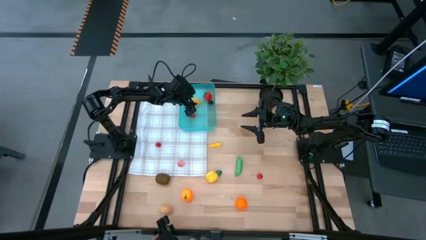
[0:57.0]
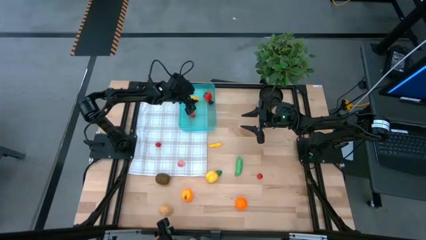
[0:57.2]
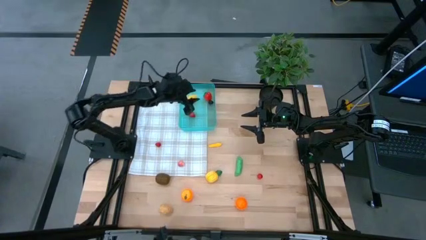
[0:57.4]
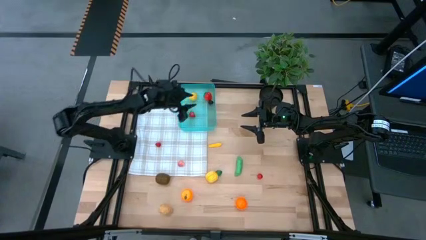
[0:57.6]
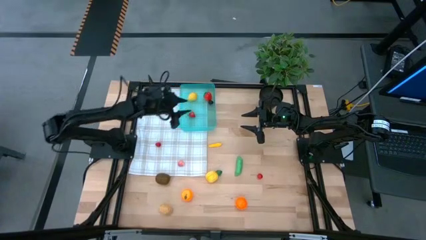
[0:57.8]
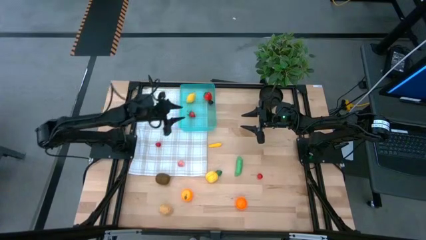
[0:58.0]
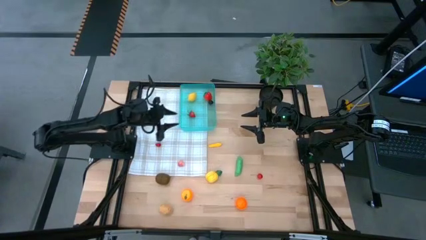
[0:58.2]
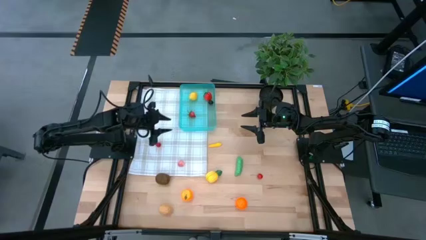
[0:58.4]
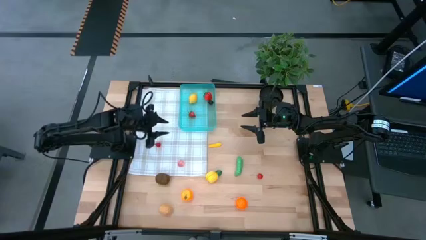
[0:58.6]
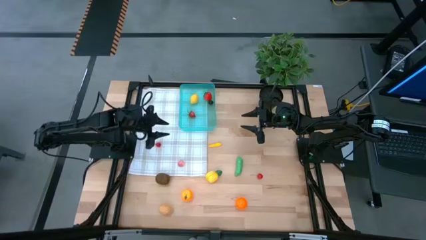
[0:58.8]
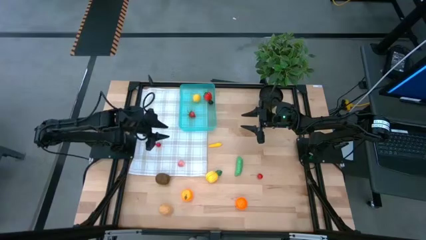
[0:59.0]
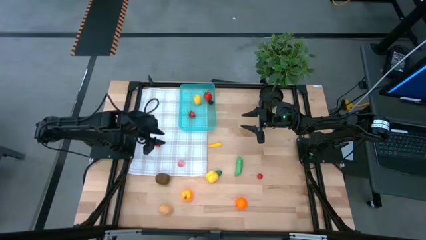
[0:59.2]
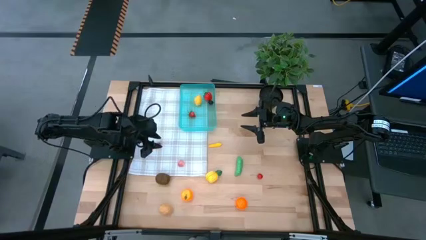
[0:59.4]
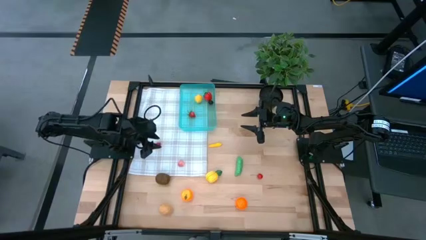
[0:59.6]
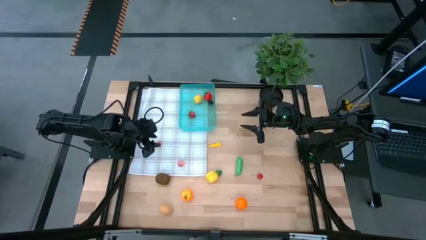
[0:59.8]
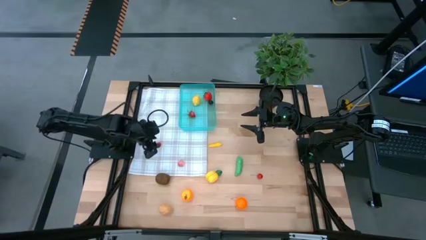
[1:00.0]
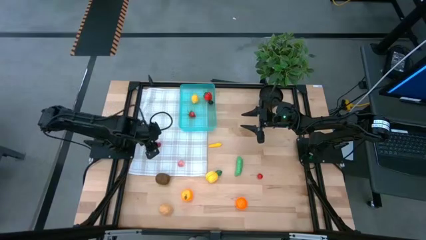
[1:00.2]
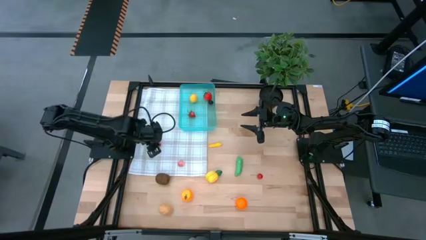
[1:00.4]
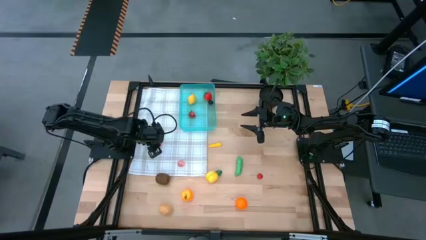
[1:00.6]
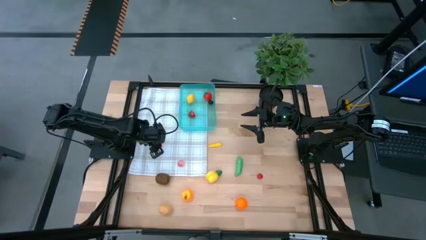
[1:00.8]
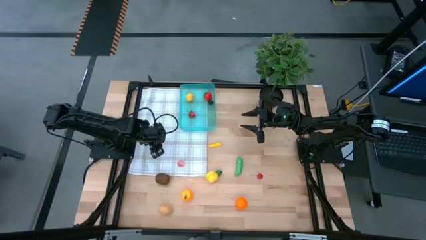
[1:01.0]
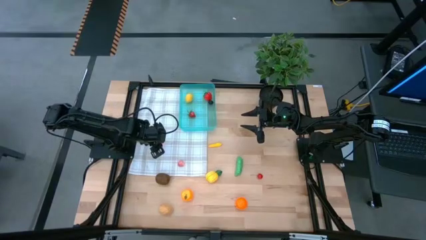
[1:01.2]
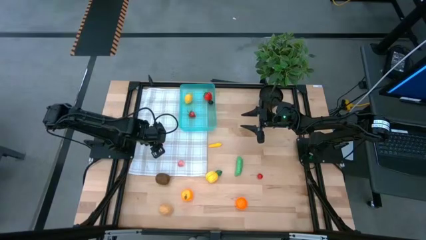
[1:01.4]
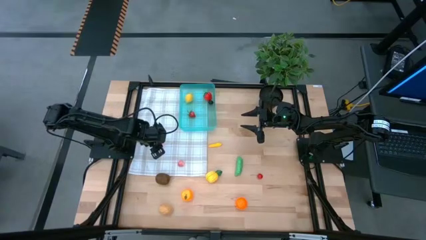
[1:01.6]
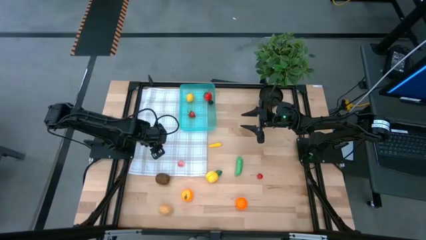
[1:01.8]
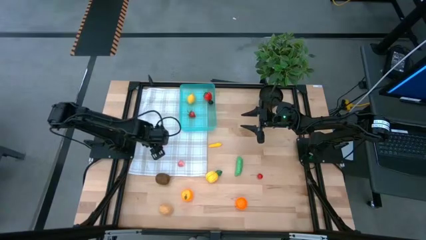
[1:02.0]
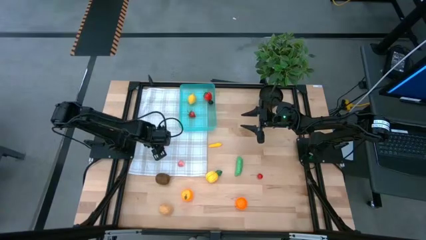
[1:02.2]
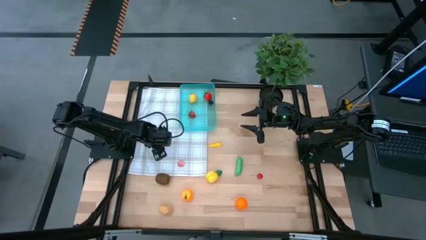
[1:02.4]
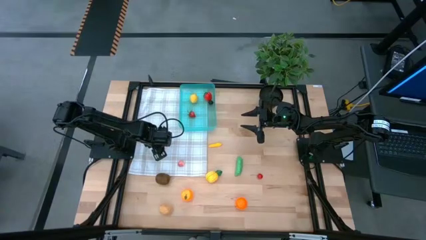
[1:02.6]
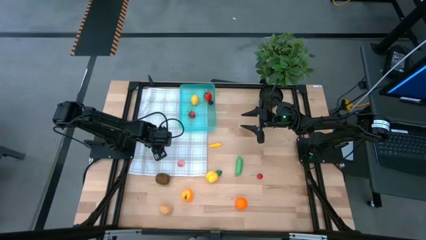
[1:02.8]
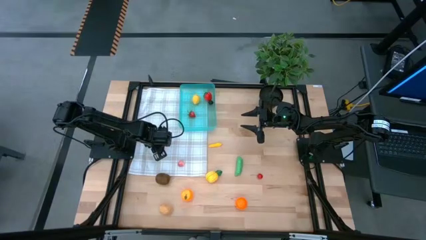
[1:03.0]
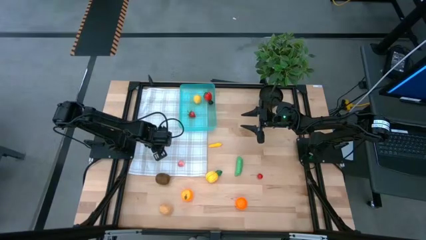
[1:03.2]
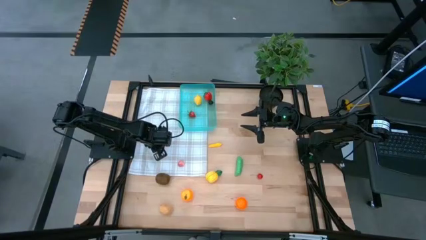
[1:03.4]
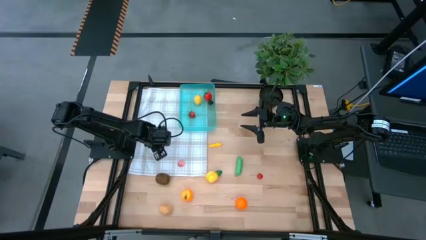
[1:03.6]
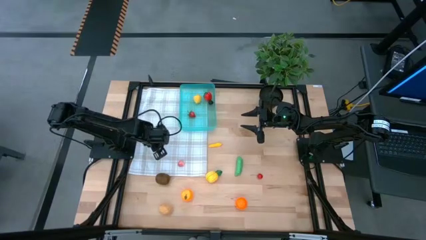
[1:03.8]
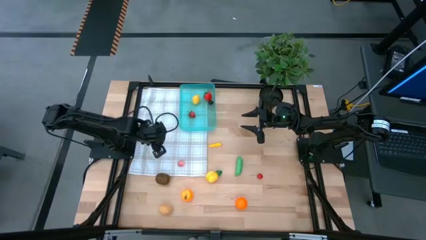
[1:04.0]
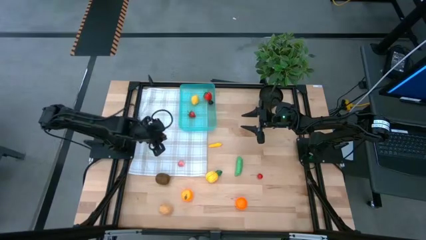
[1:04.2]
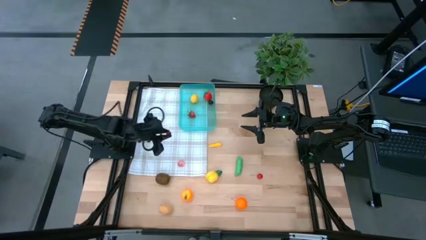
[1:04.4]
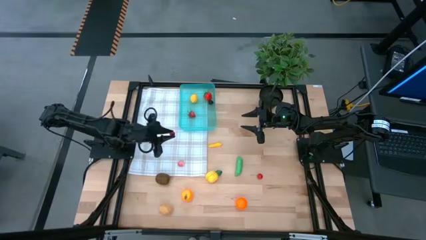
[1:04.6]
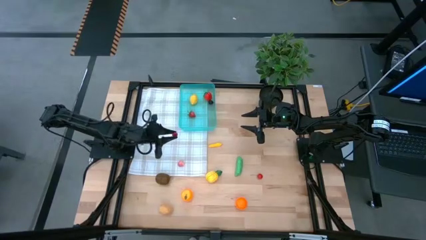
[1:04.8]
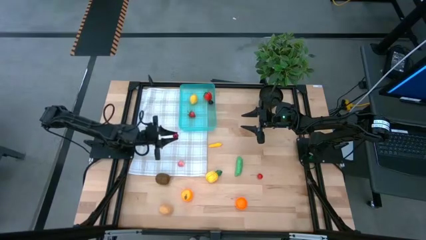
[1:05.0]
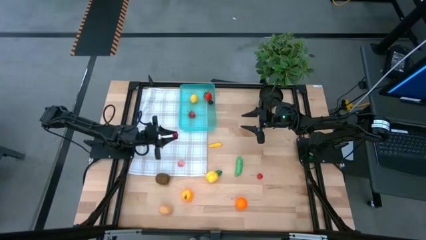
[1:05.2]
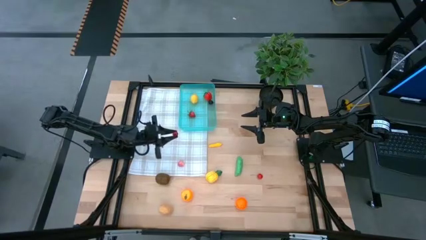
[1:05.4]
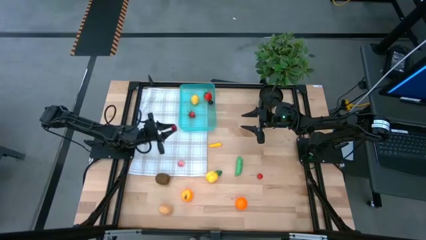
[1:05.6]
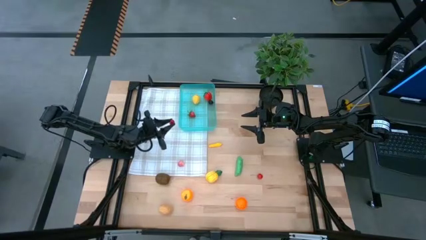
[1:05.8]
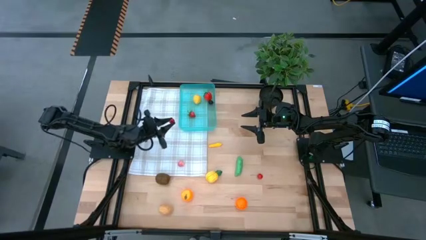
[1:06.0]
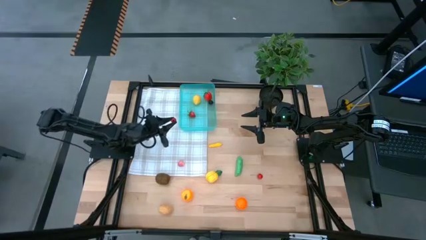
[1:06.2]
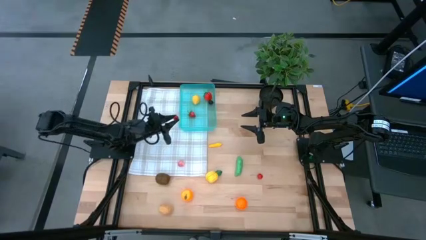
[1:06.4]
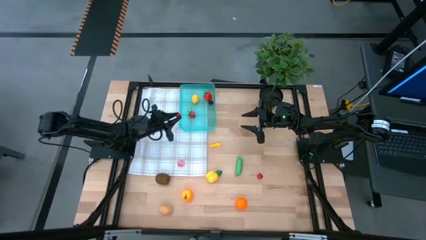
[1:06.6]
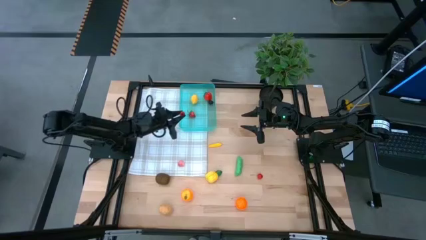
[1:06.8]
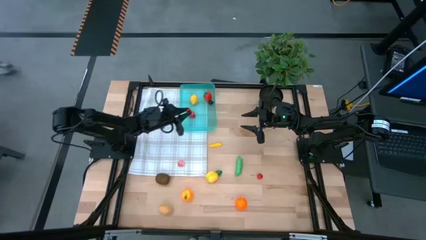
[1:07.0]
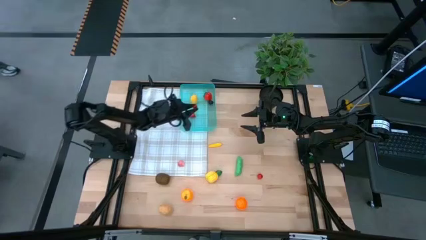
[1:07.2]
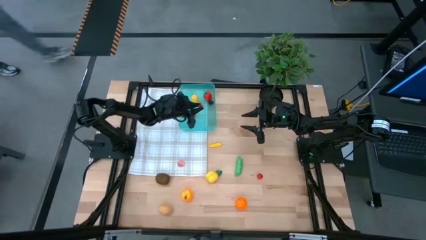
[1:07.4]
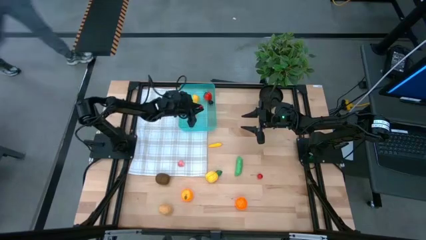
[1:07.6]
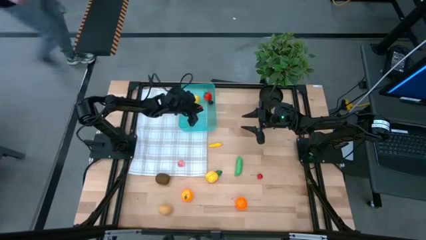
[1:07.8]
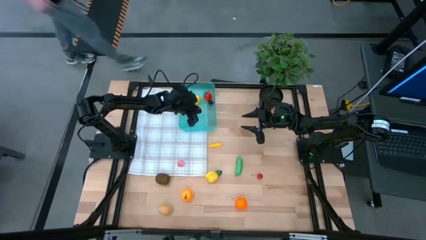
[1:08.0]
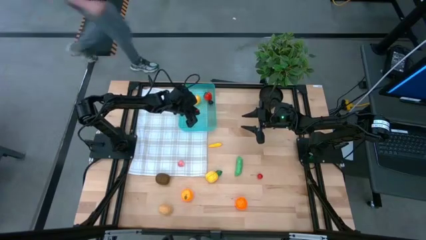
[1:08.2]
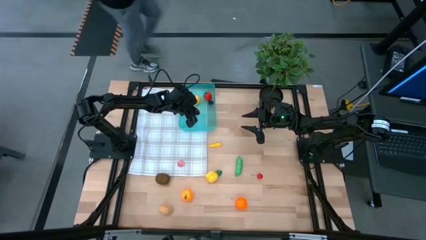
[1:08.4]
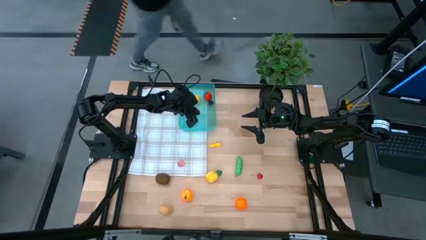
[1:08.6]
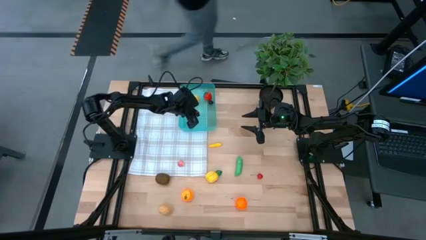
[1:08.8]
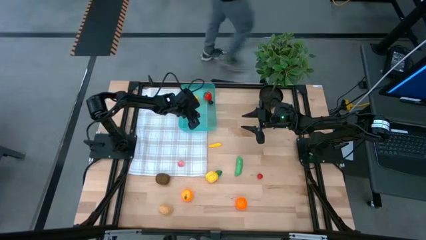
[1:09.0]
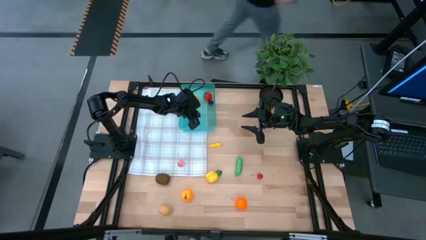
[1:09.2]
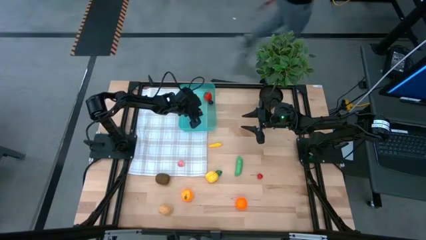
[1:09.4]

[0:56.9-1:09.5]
Task: Pick and placing Produce into tupperware
Put the red raspberry into the blue bin

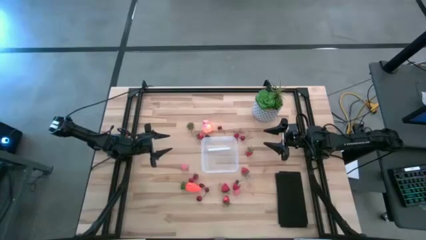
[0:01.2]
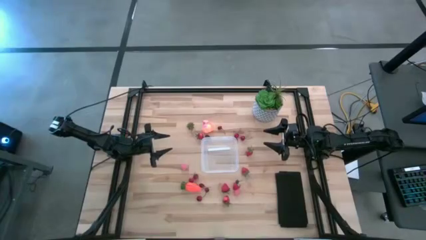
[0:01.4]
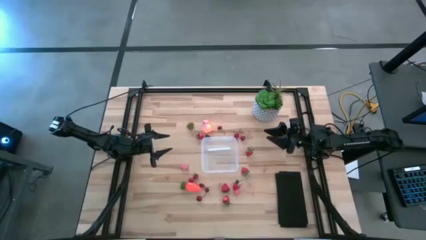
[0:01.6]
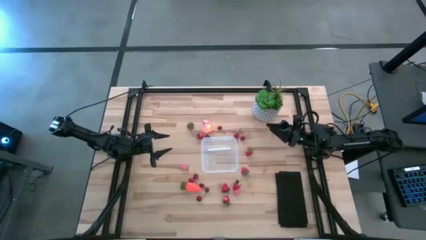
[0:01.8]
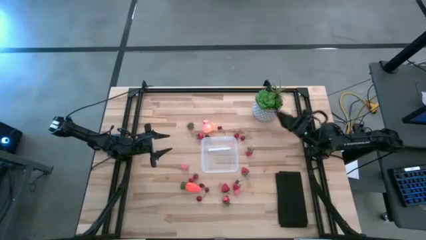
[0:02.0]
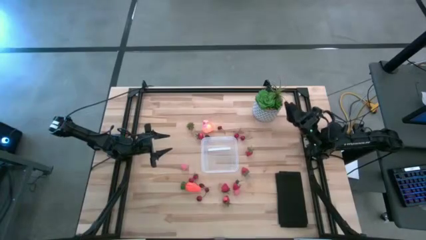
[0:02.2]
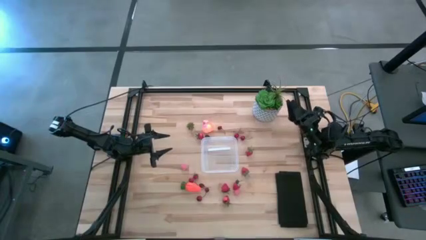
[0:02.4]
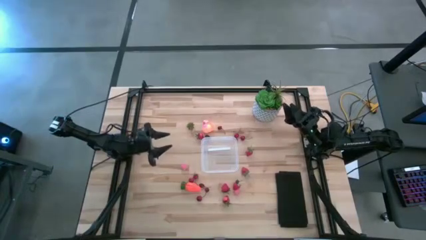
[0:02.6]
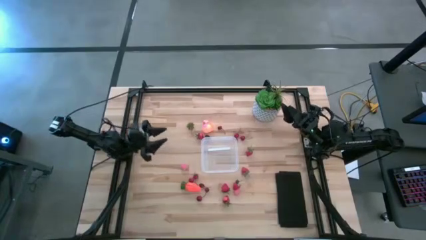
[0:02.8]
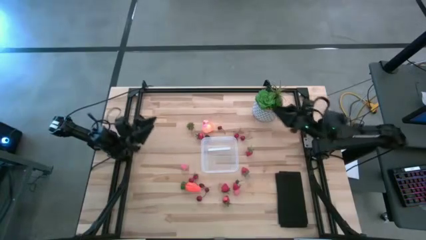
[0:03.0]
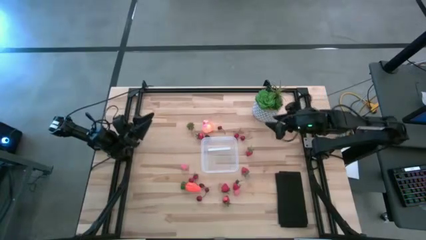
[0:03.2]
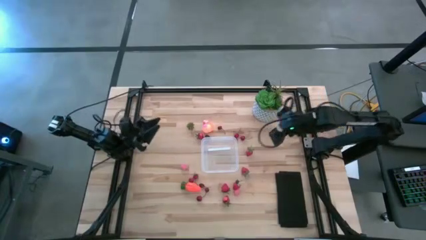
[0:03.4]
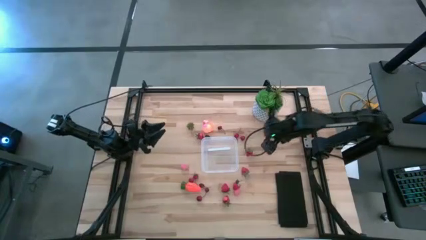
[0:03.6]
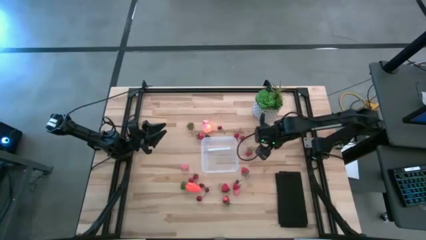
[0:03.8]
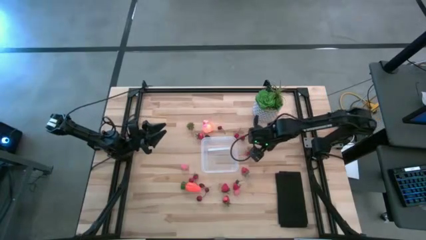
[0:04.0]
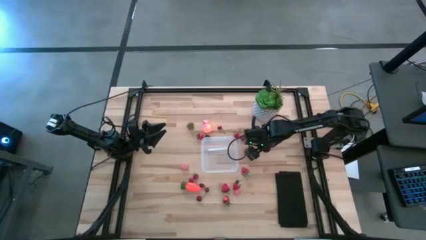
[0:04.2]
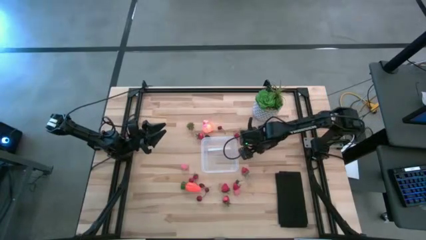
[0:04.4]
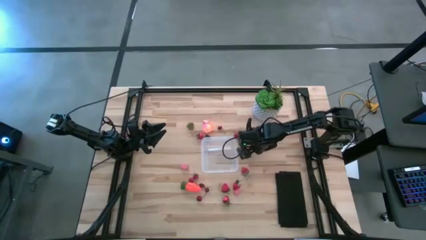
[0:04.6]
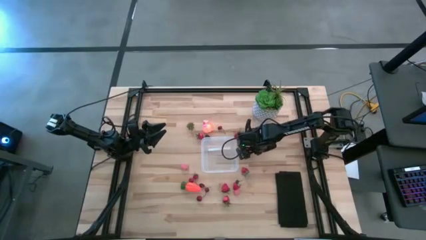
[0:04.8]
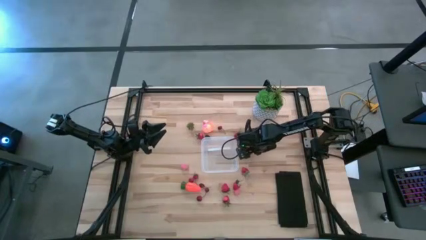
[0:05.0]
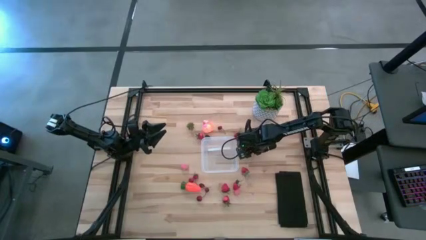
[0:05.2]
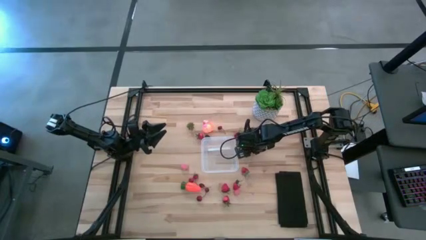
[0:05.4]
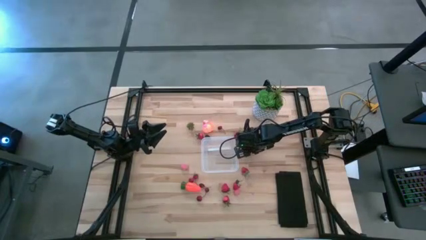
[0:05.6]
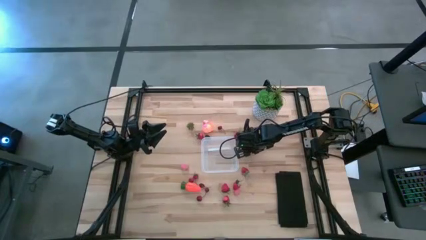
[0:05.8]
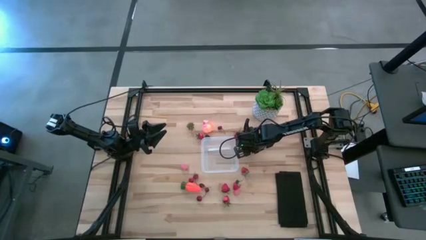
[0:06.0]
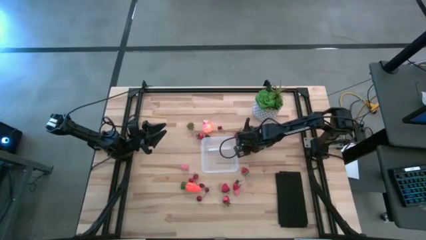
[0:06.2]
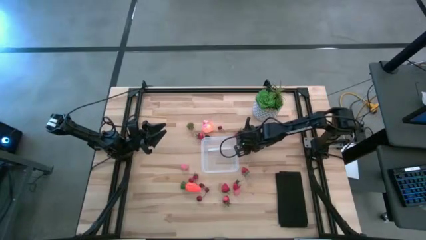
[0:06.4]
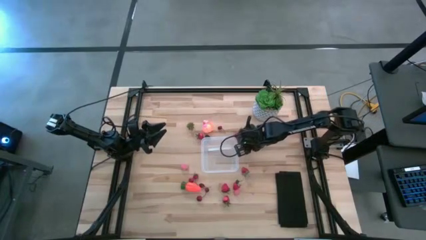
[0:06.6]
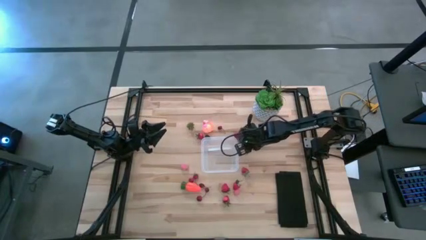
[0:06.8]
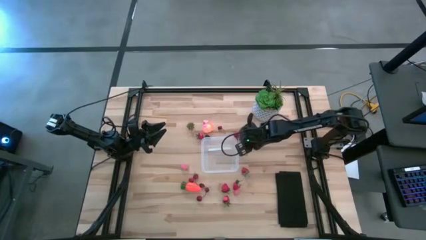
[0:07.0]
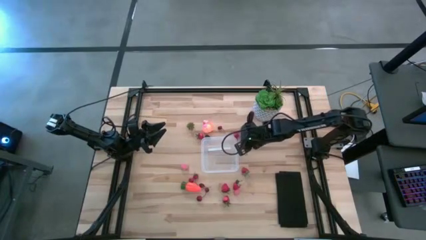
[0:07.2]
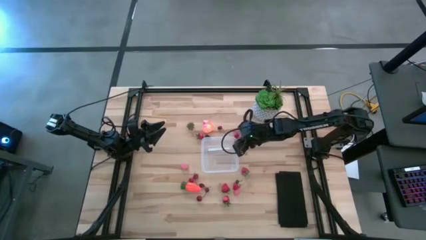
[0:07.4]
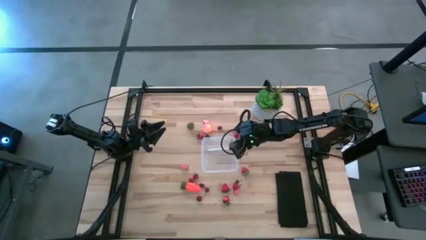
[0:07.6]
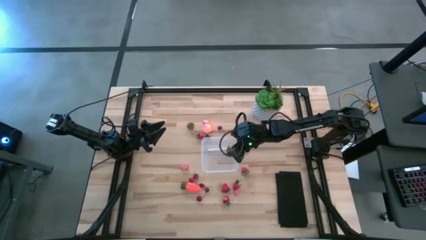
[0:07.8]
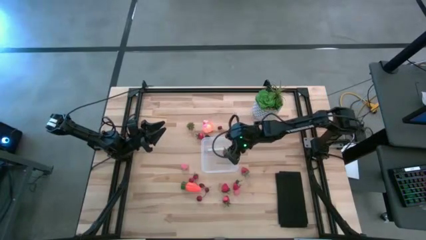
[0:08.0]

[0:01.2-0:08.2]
Task: Pick and placing Produce into tupperware
Put the red strawberry into the transparent container
